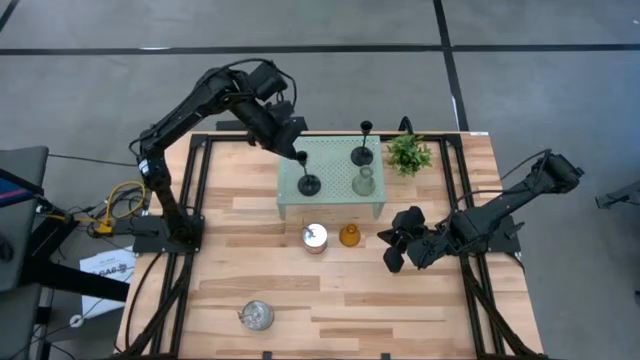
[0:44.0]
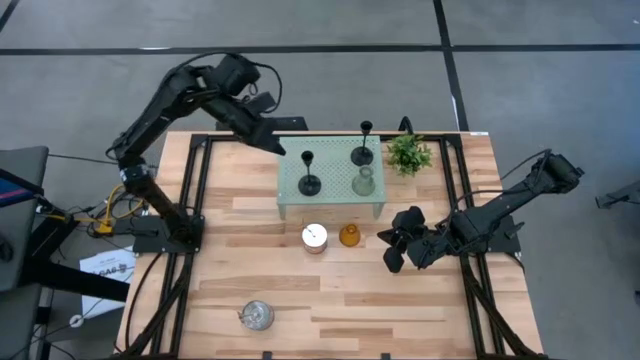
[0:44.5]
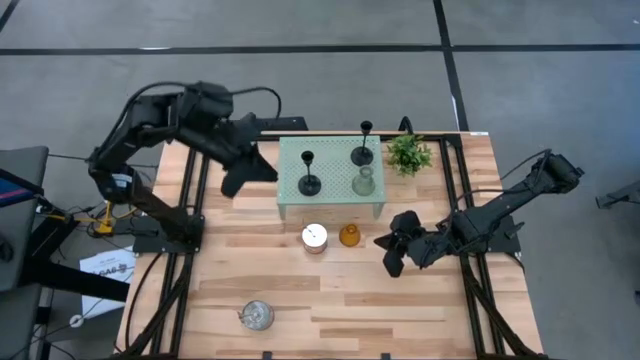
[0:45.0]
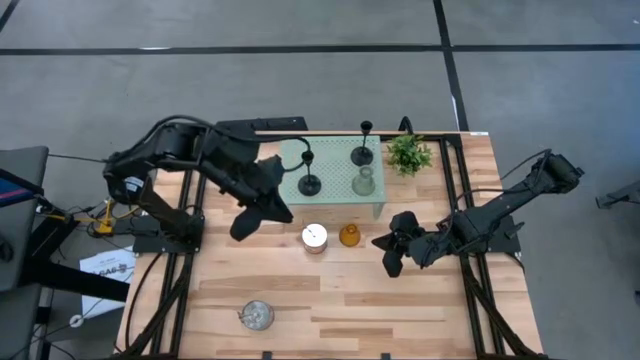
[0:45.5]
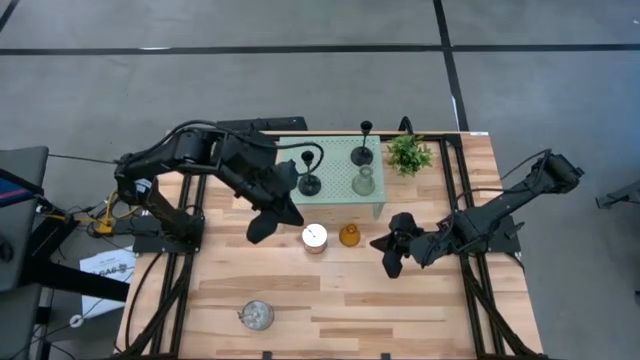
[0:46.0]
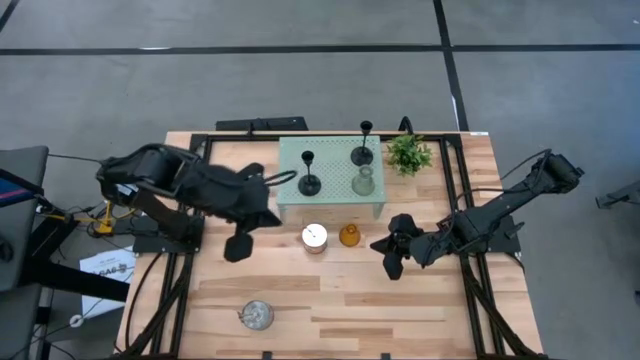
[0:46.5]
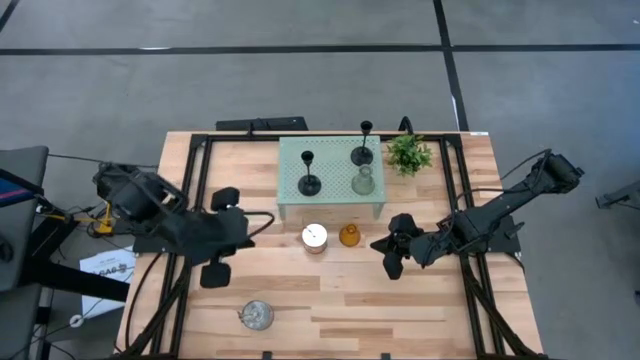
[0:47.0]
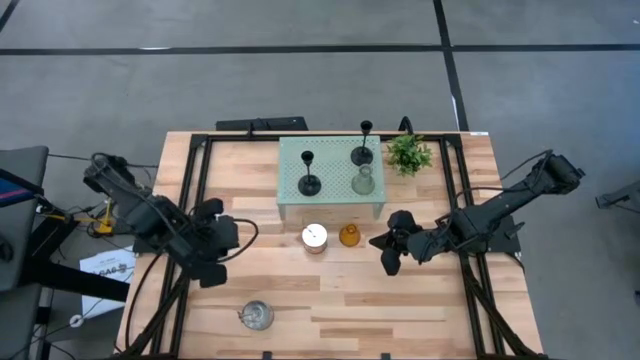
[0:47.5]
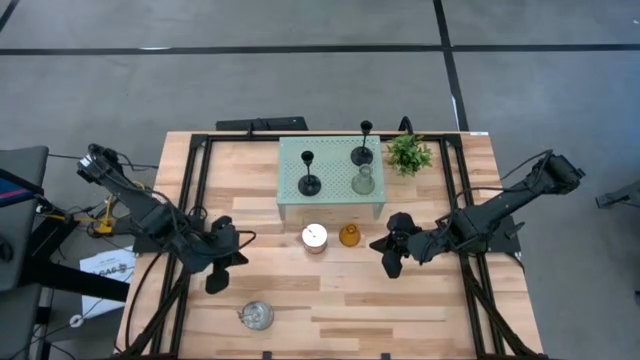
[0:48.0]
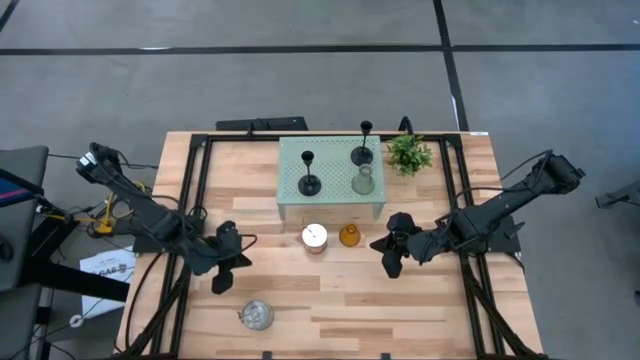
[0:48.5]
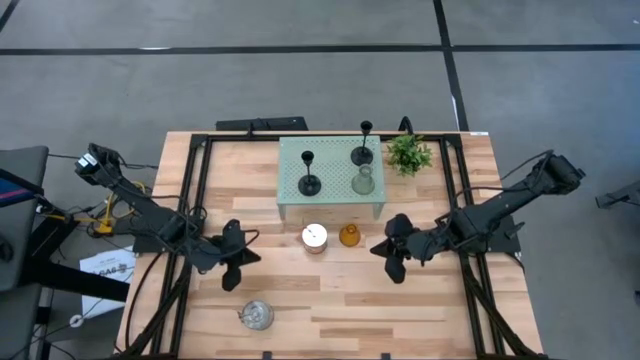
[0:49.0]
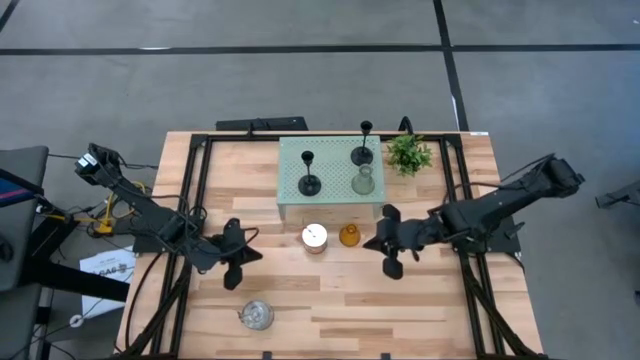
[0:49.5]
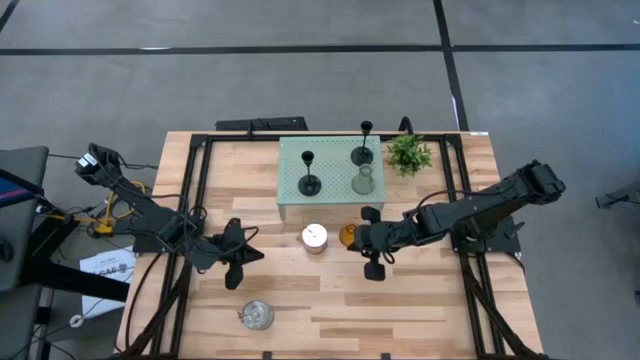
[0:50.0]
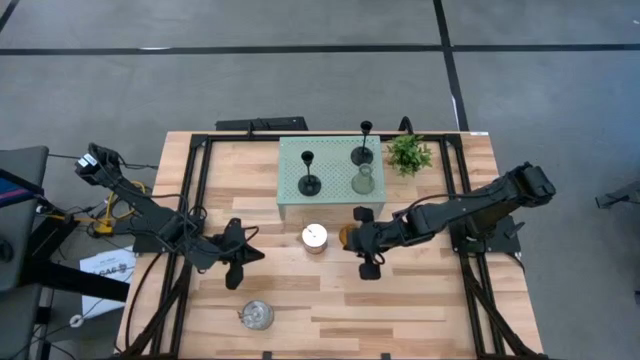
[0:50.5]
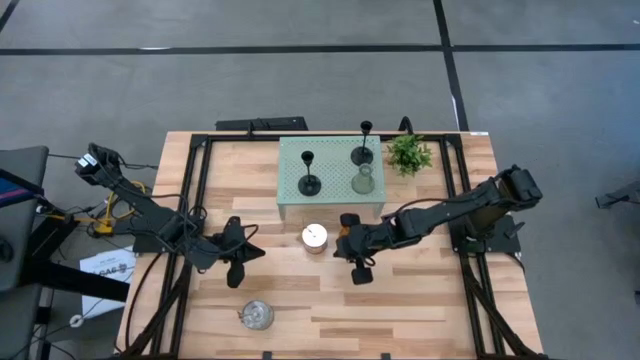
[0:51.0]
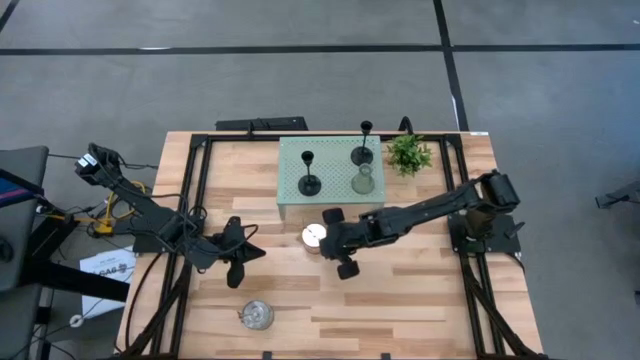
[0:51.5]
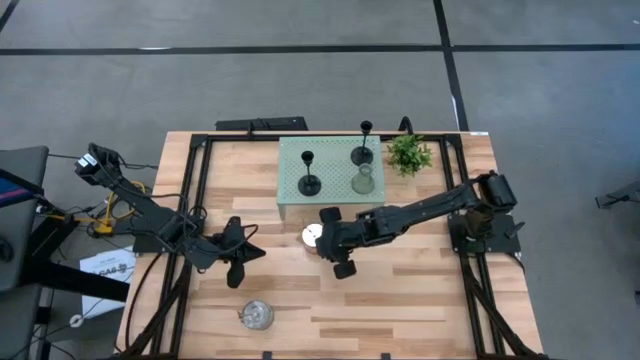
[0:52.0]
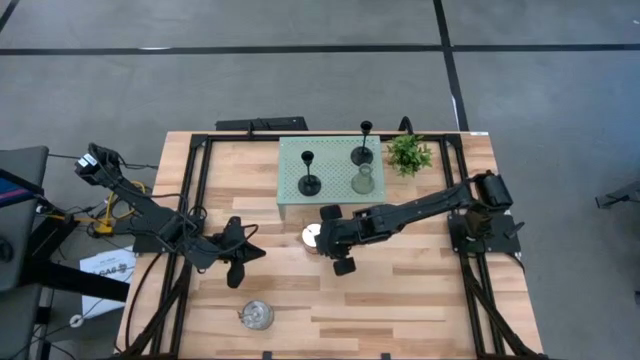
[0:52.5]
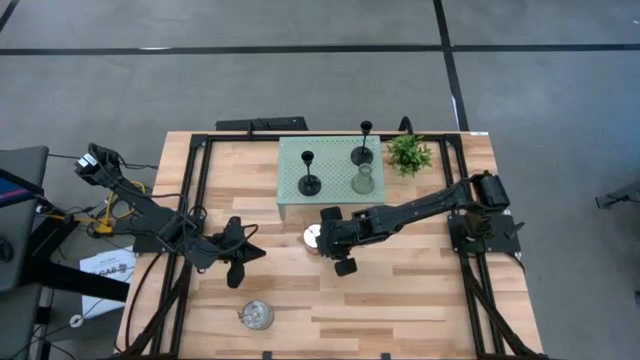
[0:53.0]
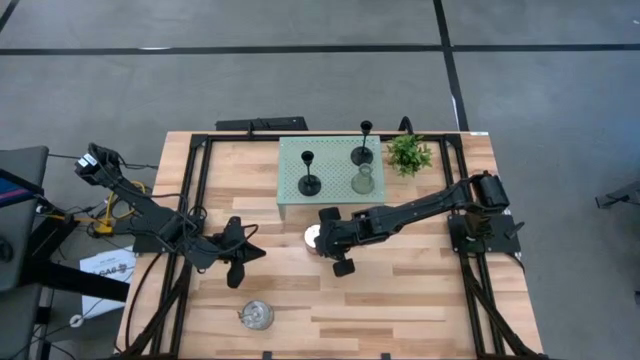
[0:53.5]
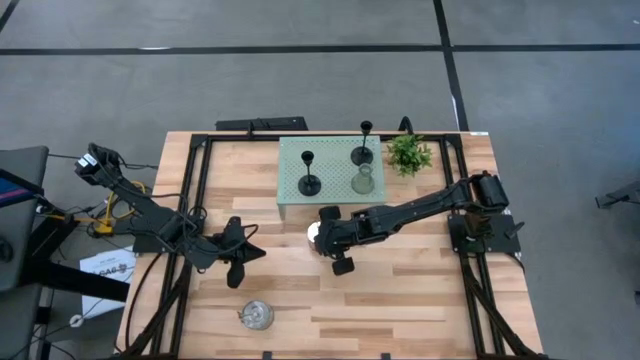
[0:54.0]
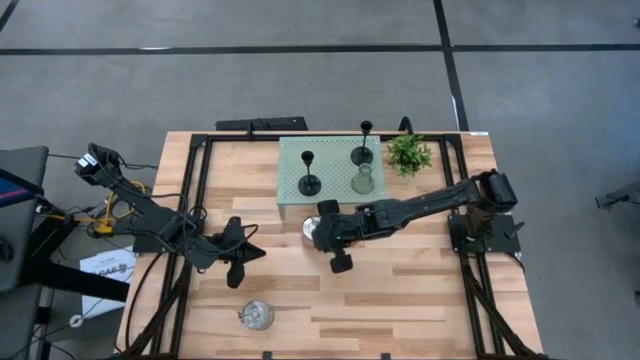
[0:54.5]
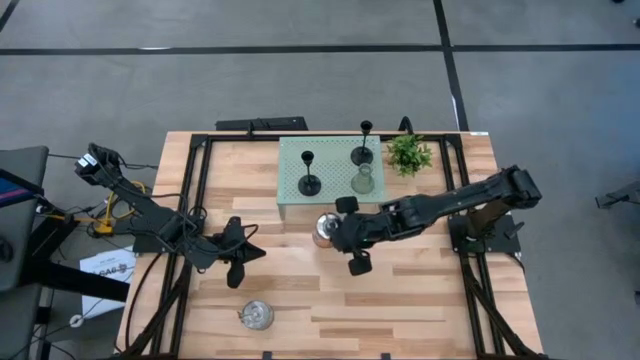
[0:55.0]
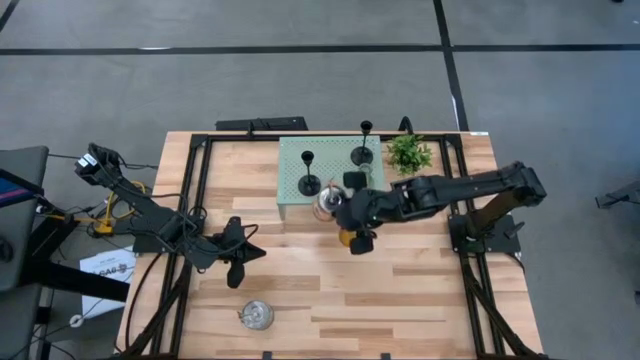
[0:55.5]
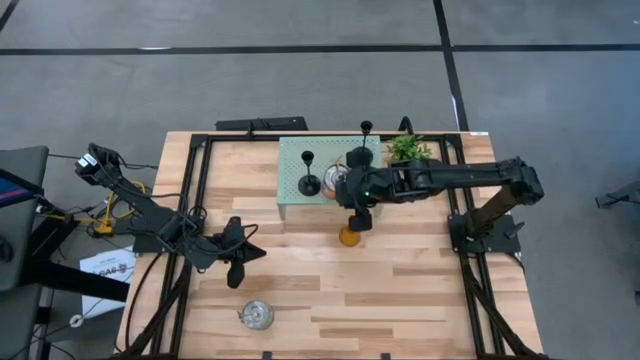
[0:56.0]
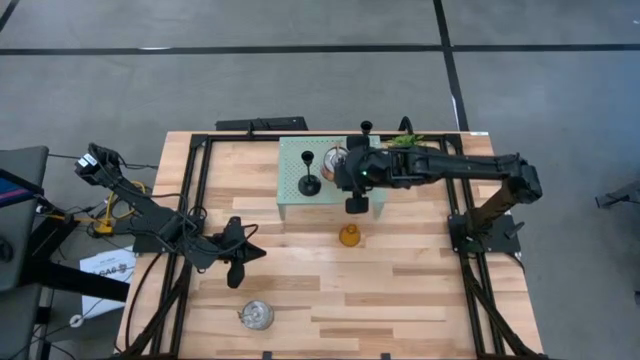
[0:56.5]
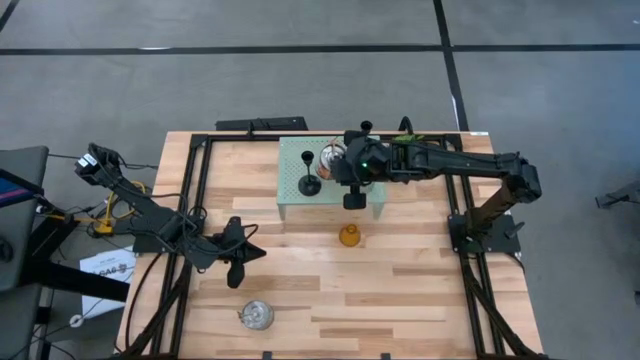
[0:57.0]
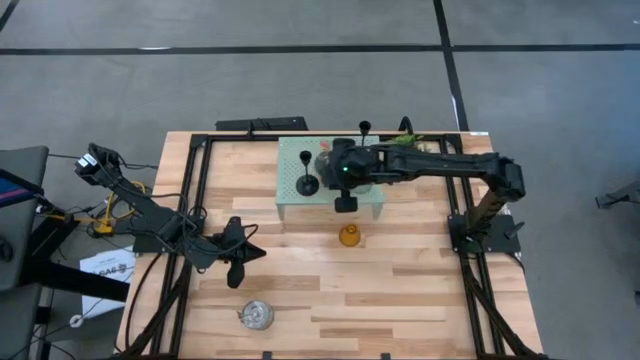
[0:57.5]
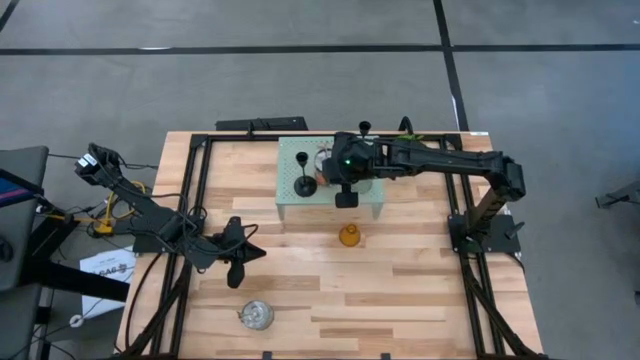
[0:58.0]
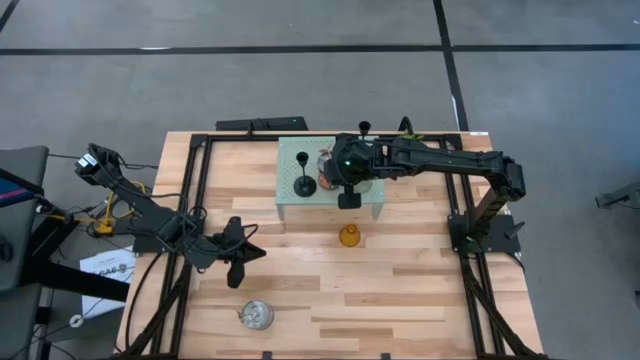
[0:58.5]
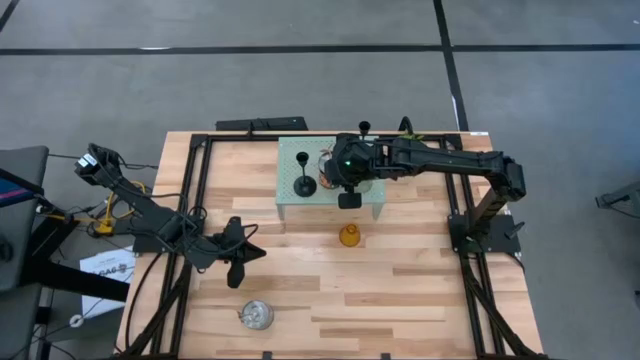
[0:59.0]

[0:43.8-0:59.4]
Task: Pick & Place candle stick holders
Put the orange scented candle on the shelf

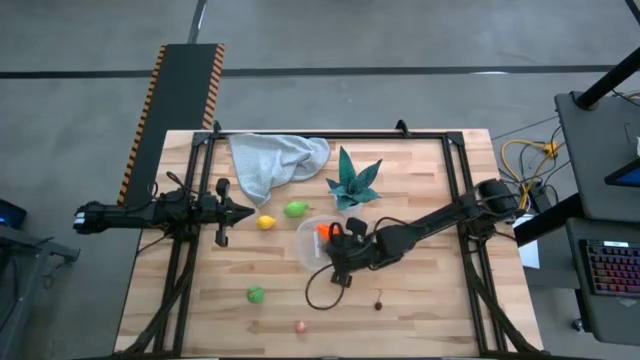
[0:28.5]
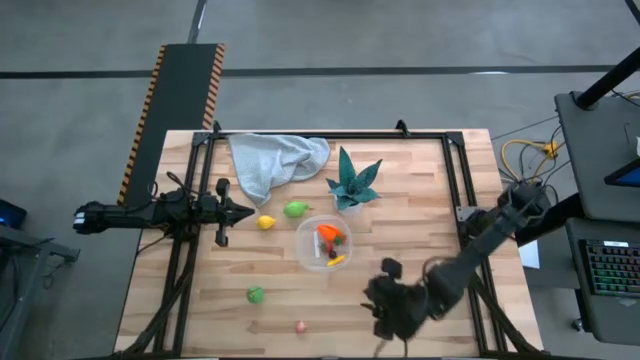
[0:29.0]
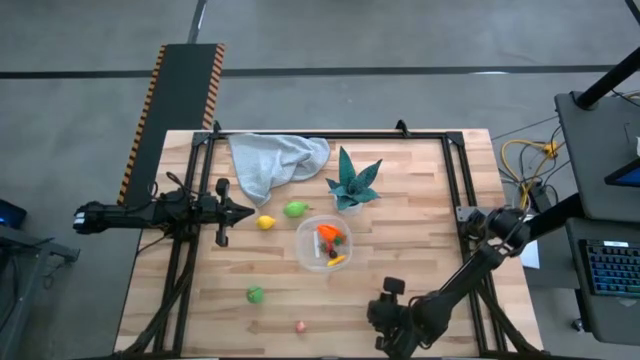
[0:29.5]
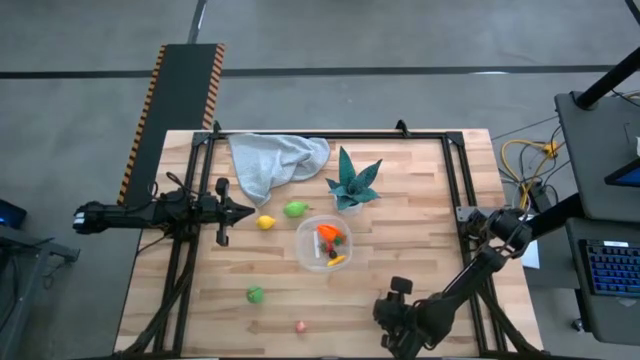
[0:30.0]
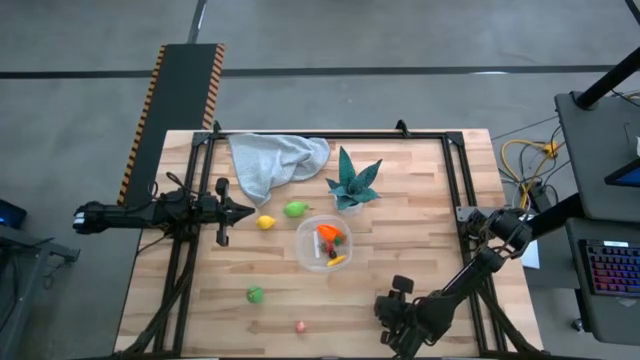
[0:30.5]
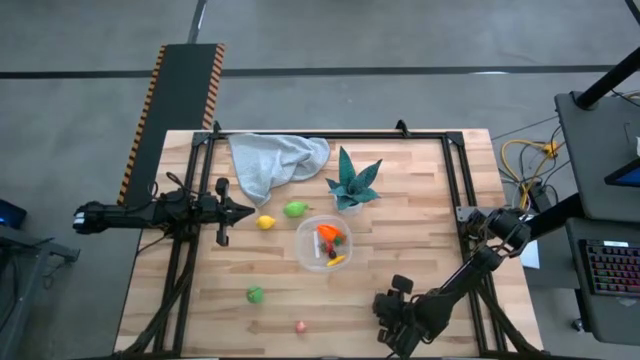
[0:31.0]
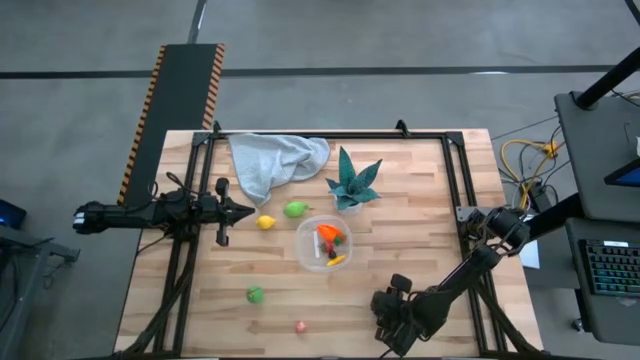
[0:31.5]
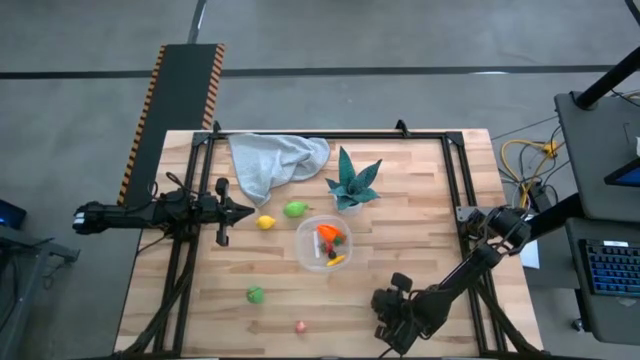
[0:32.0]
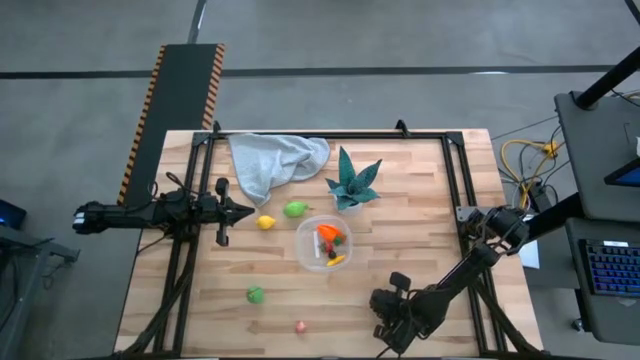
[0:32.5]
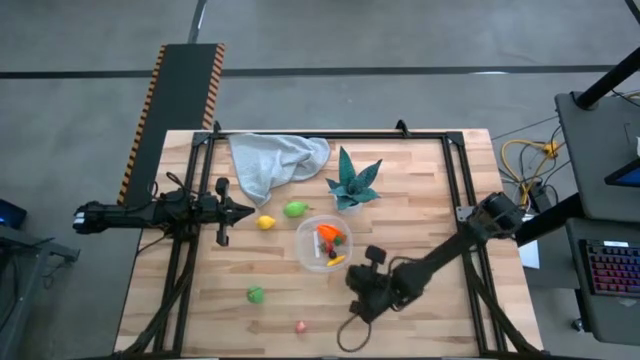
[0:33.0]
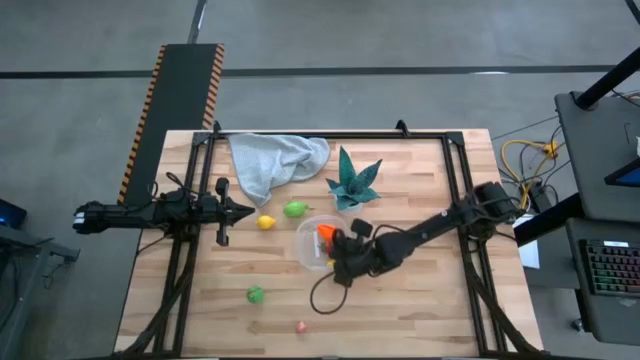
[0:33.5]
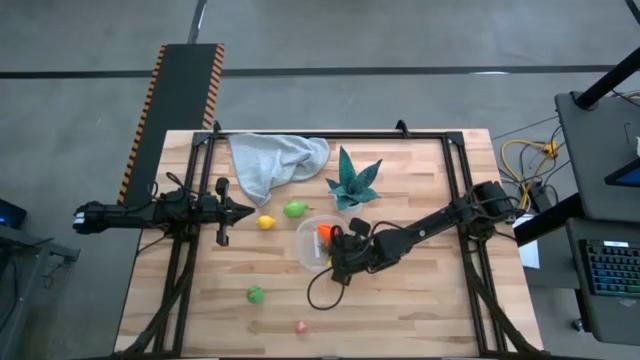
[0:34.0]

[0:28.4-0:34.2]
Task: Pick and placing Produce into tupperware
Put the red cherry into the transparent bin
